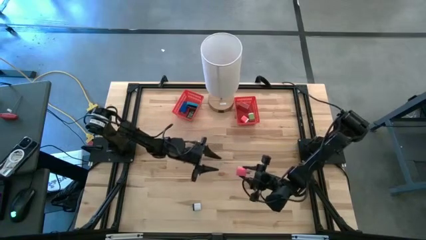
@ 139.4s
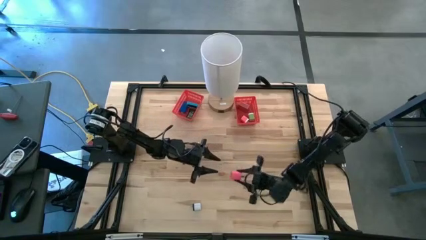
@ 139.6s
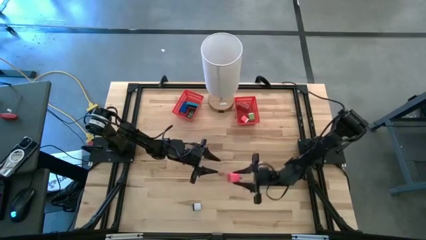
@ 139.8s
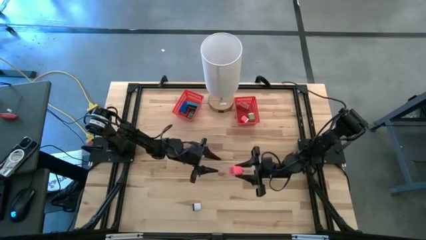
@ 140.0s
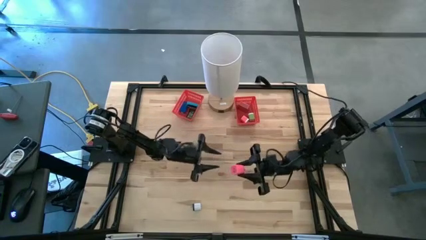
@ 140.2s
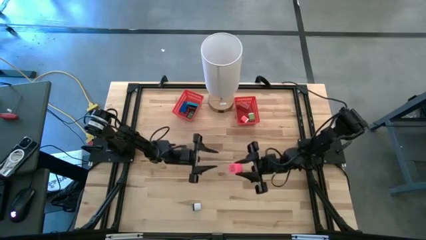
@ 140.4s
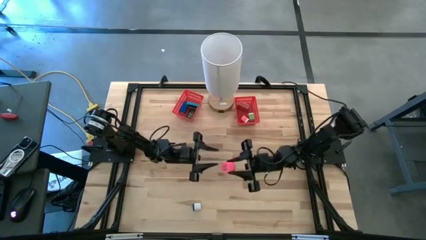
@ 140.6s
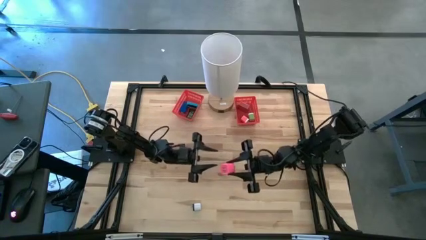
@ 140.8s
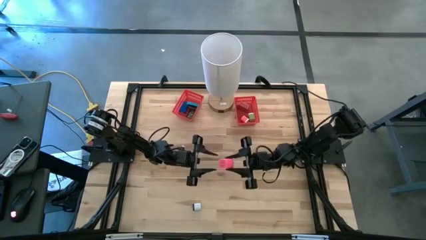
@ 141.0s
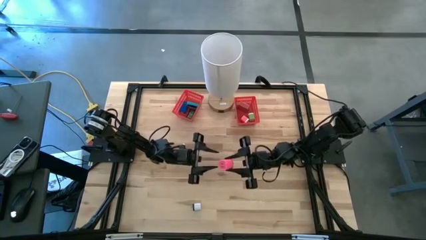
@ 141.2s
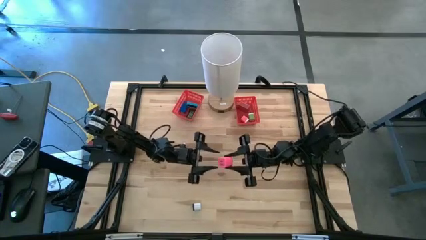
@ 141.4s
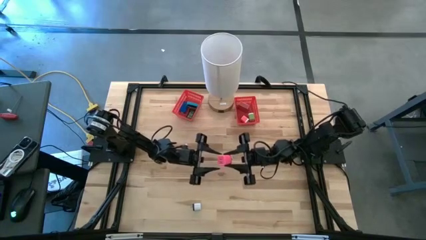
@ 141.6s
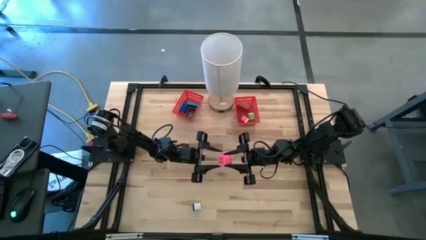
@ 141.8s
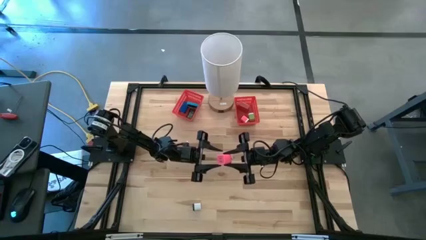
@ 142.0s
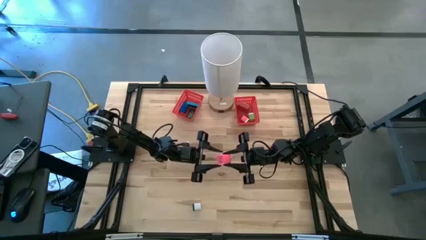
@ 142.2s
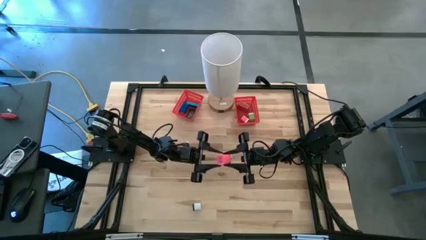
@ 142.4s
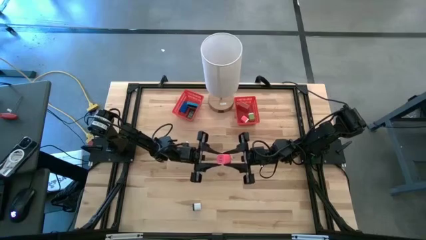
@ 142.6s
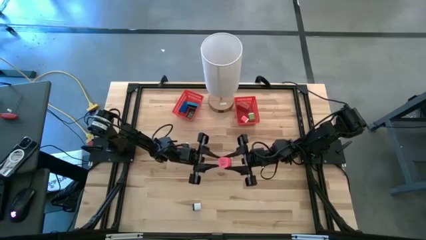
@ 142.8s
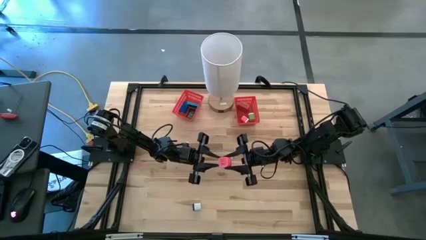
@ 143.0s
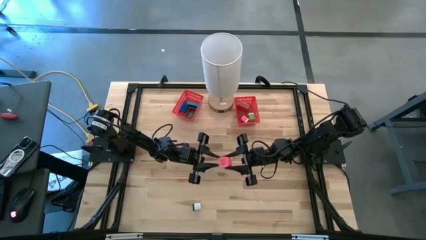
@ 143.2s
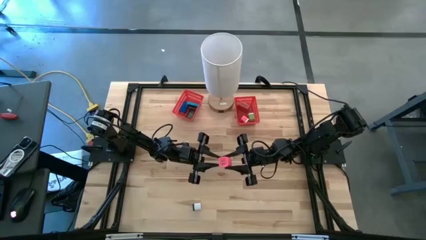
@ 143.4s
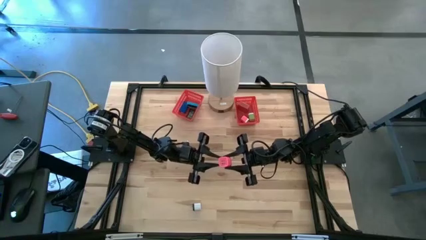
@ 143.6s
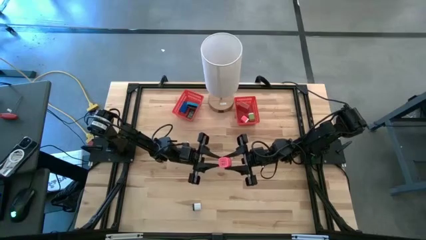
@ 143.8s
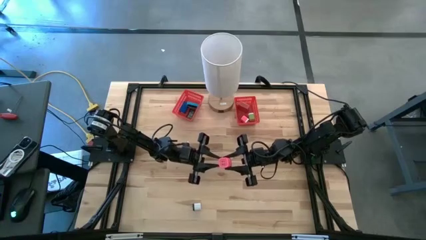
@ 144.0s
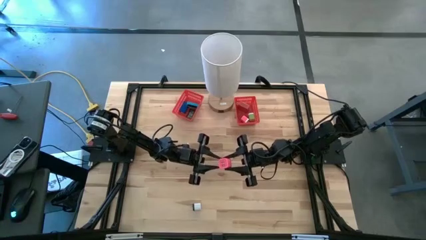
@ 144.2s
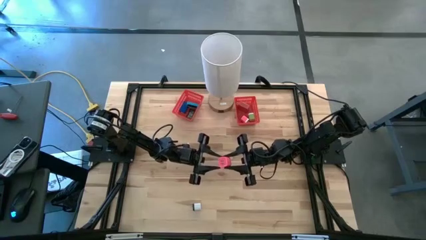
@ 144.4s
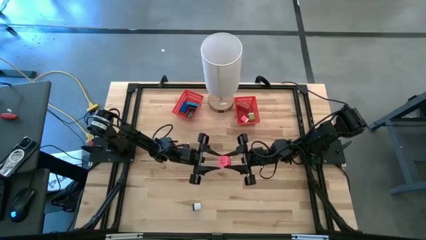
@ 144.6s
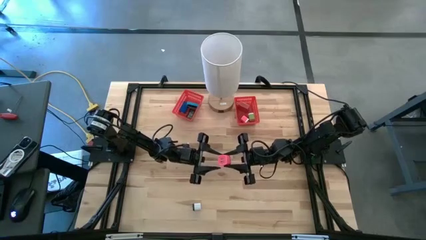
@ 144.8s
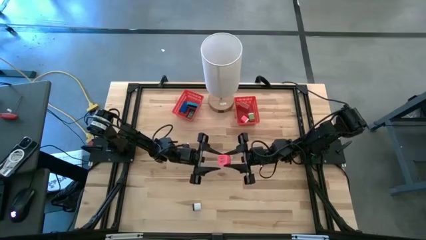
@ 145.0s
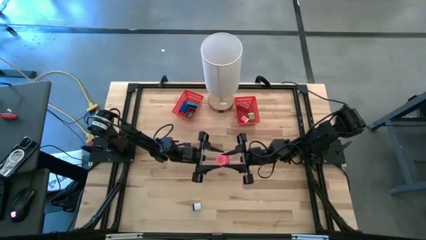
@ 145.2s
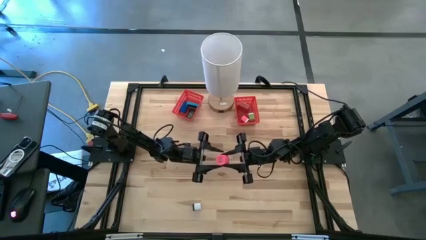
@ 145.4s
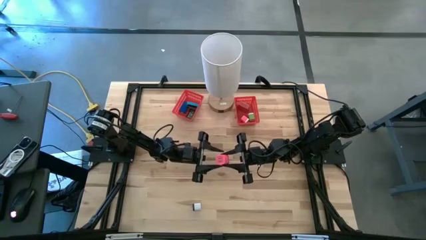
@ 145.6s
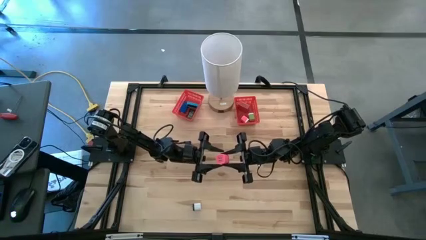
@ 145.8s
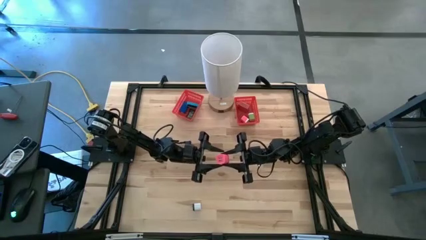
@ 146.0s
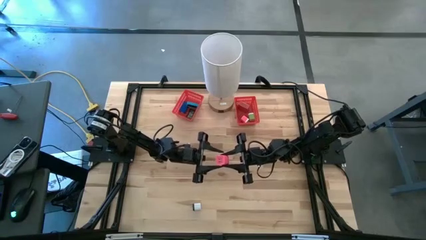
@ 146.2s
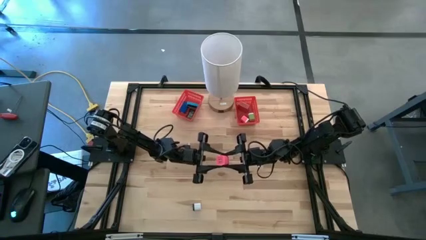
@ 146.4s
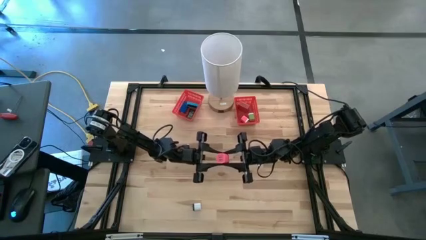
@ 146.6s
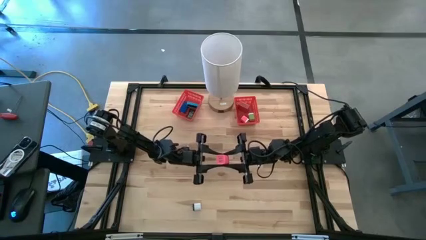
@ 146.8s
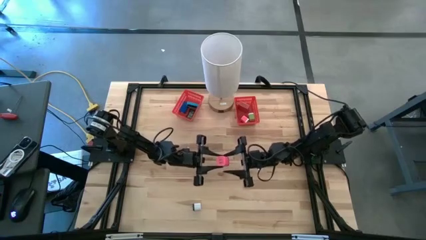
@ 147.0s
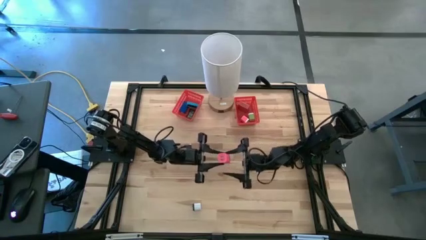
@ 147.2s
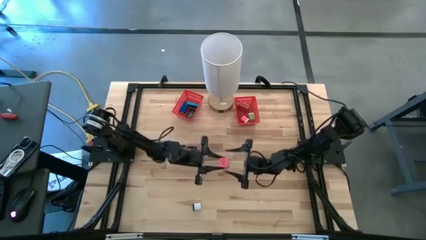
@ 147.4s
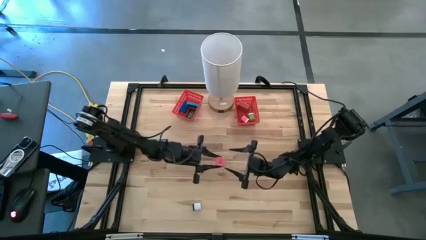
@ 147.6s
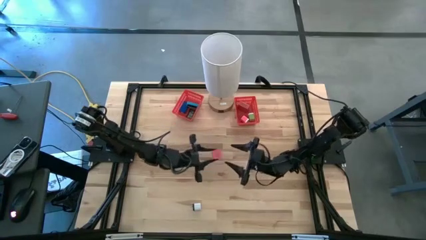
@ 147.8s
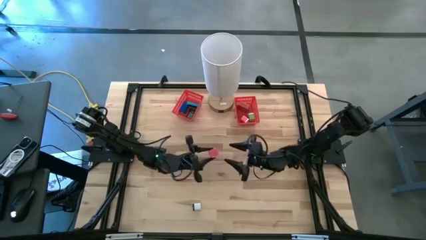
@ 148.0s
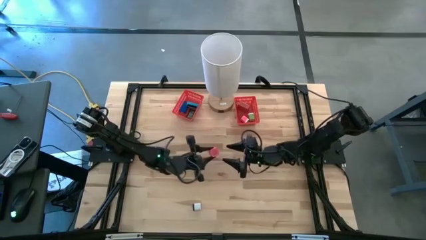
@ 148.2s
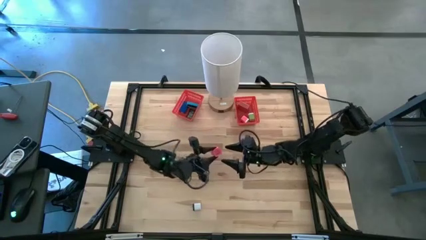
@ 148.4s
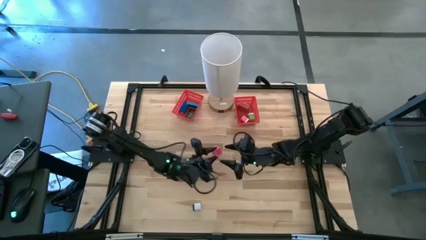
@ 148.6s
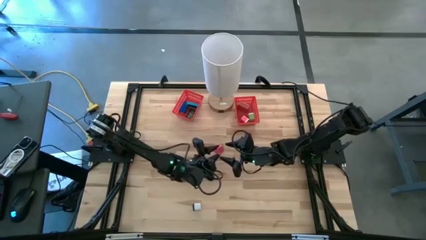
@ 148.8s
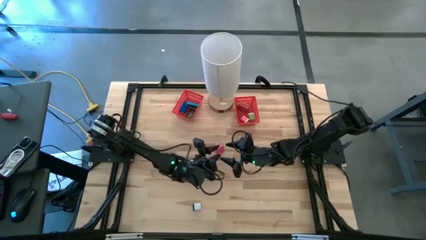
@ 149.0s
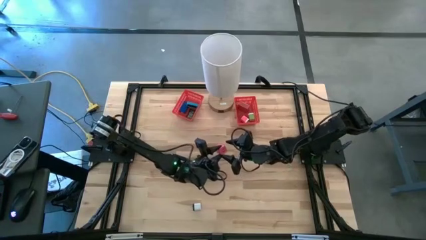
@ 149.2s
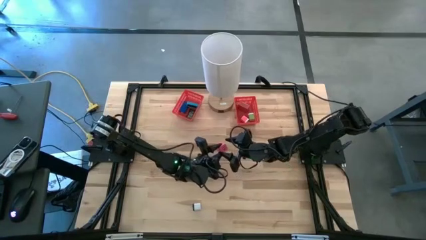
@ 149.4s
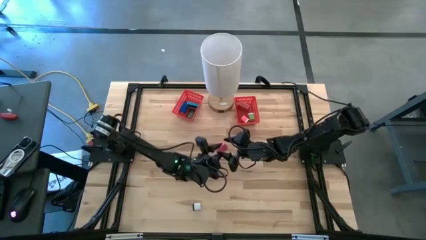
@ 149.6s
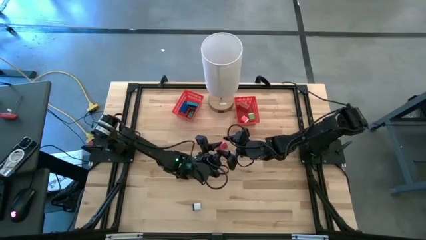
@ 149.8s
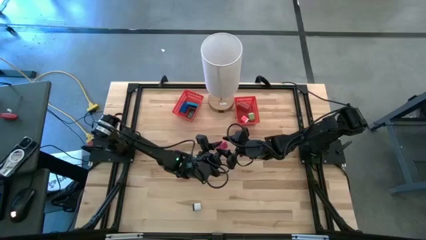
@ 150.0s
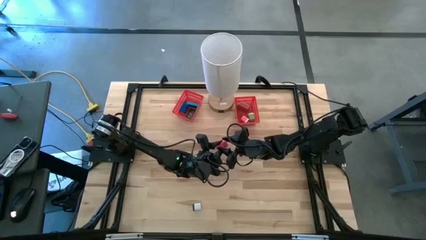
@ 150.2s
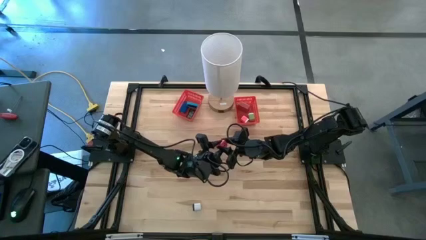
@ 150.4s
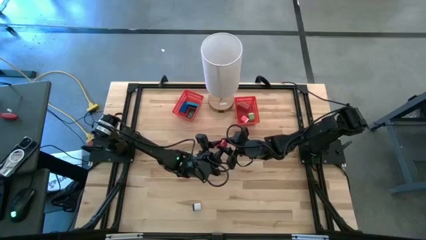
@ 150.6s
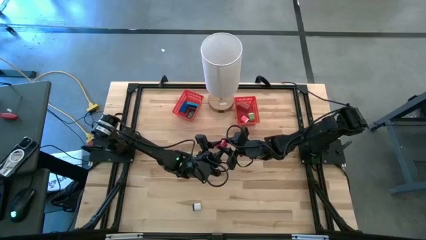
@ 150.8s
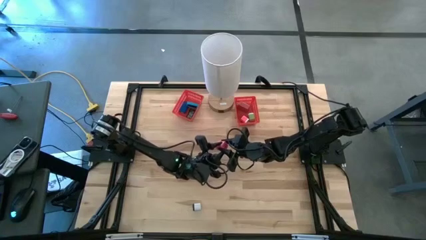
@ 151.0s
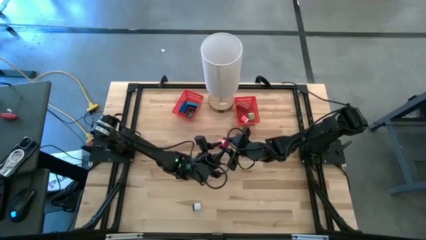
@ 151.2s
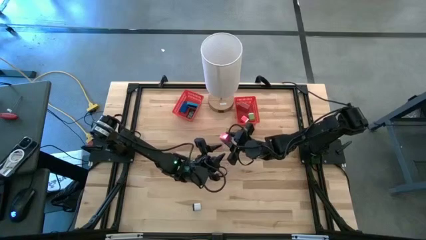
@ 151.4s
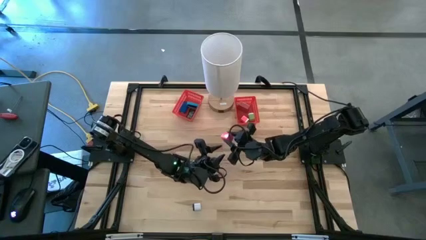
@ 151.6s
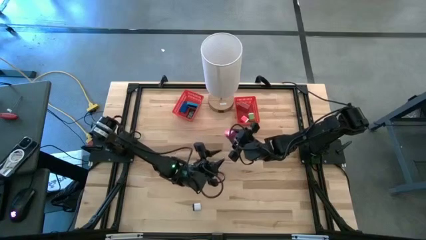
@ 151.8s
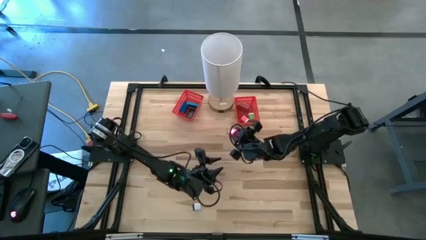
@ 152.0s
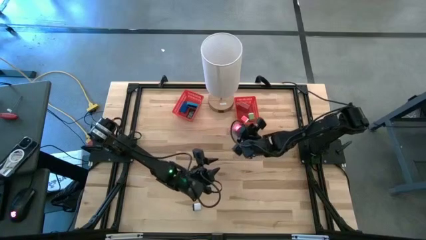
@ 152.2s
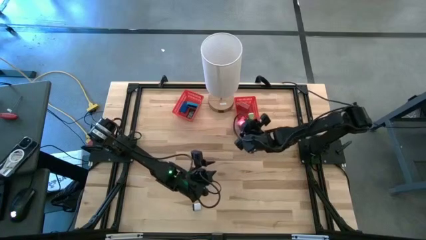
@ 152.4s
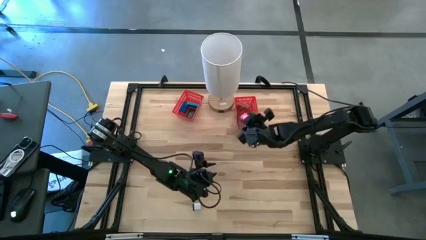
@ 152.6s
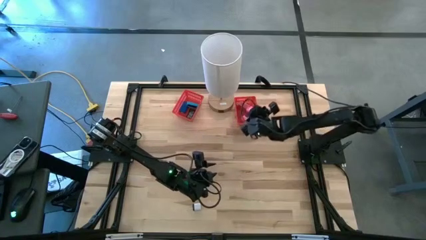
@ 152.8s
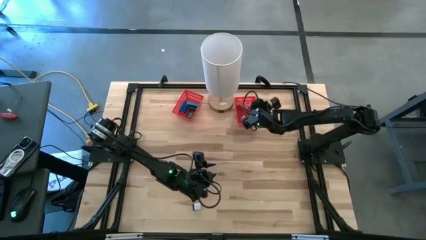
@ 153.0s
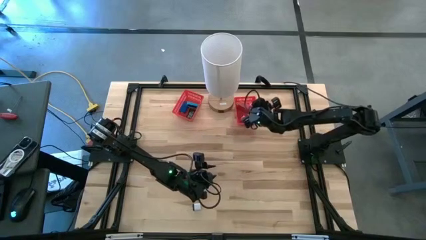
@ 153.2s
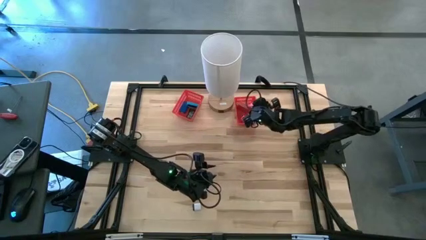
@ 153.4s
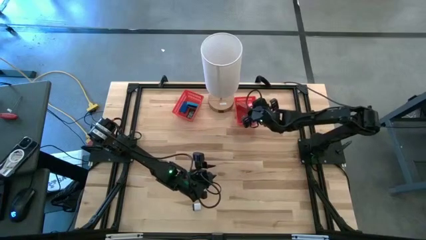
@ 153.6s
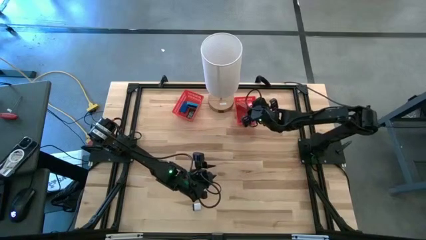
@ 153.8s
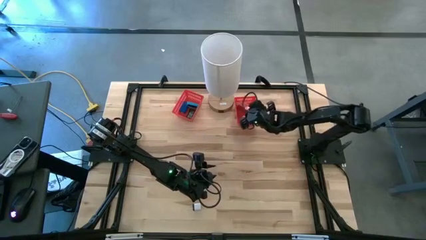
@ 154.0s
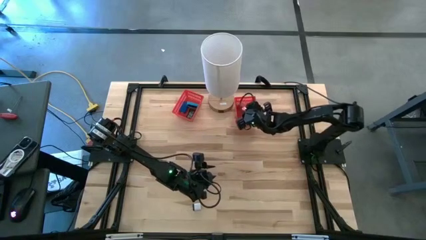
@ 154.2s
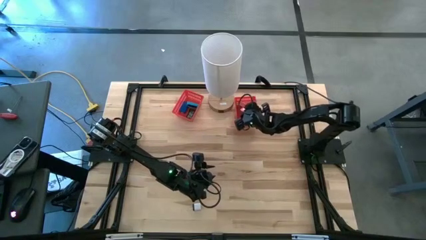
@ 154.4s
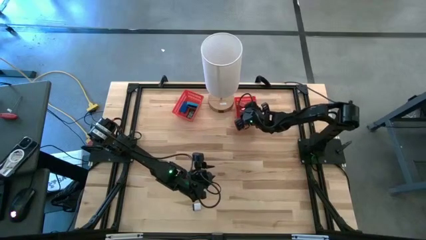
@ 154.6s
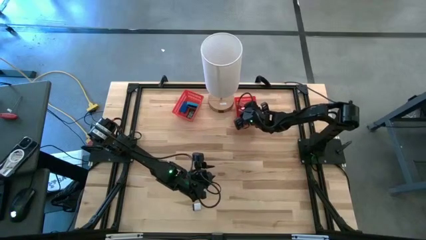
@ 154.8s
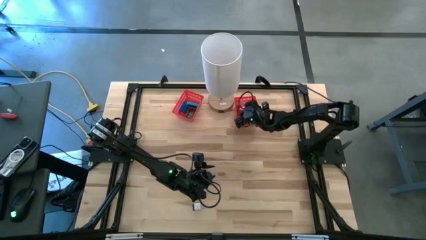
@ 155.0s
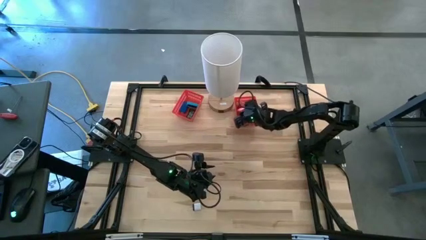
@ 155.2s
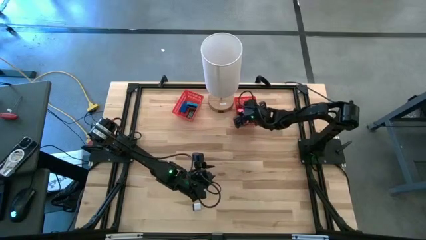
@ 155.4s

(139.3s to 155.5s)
Task: Sort adapters and digital timers
Put the pink charger adapter into the right red bin
